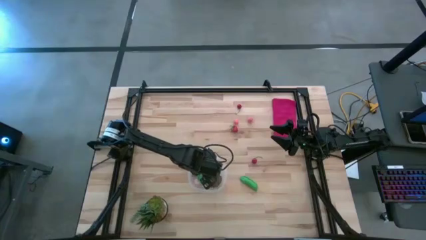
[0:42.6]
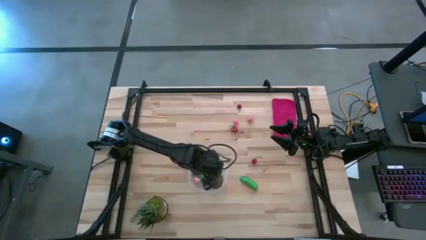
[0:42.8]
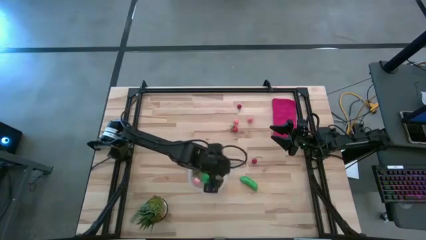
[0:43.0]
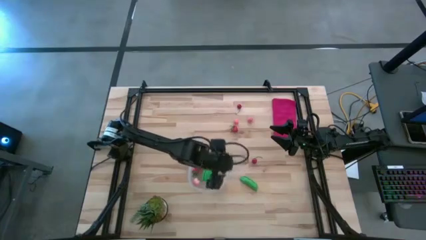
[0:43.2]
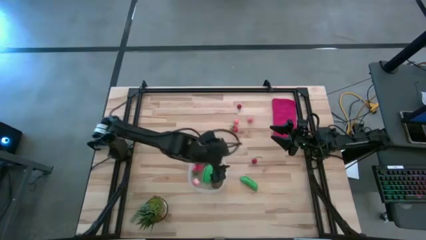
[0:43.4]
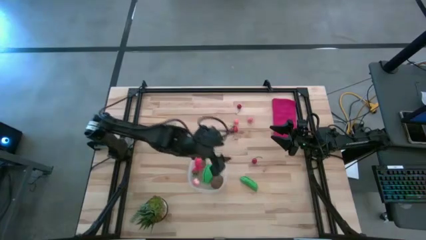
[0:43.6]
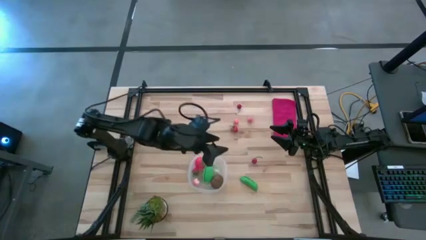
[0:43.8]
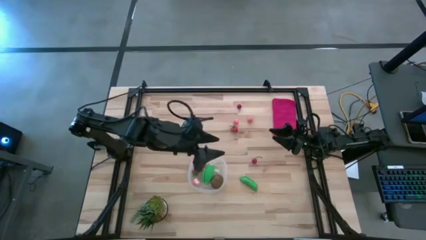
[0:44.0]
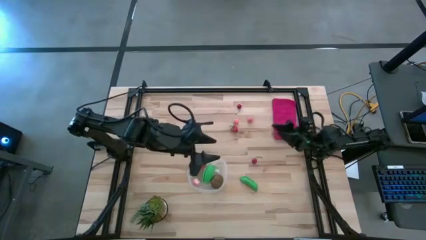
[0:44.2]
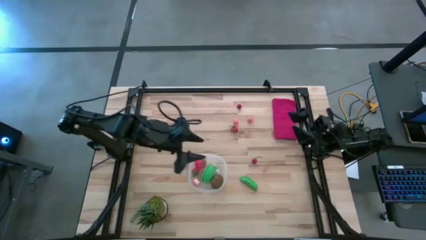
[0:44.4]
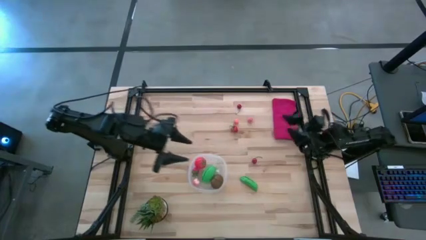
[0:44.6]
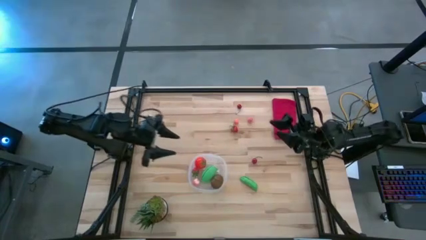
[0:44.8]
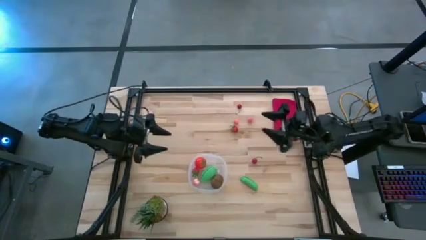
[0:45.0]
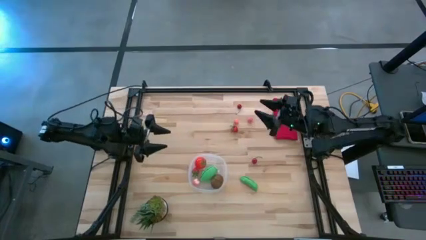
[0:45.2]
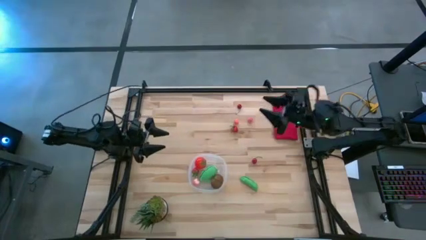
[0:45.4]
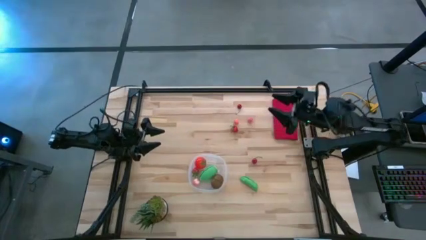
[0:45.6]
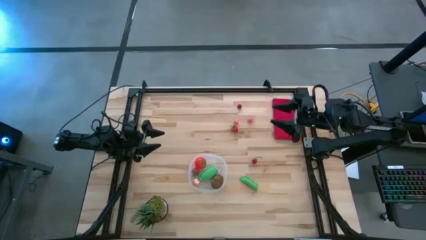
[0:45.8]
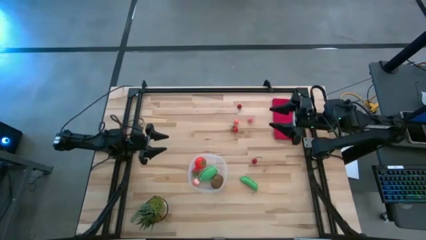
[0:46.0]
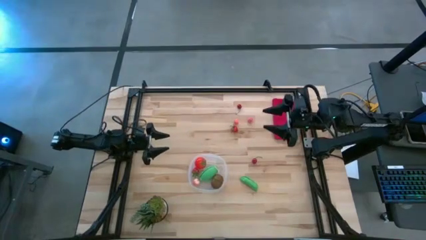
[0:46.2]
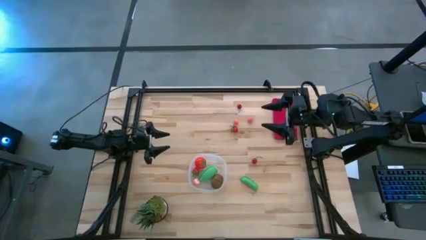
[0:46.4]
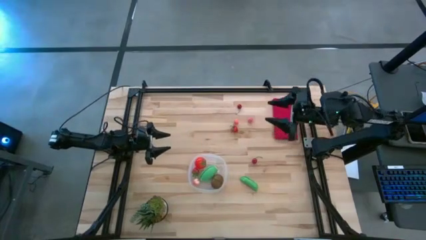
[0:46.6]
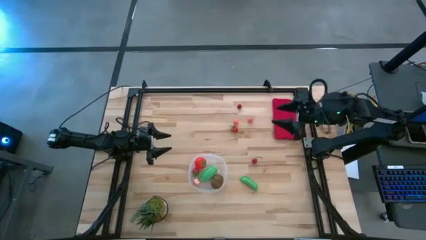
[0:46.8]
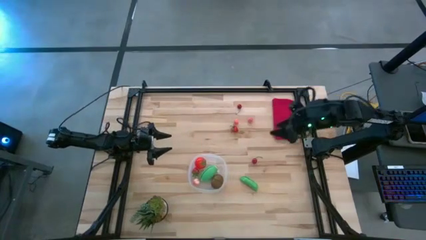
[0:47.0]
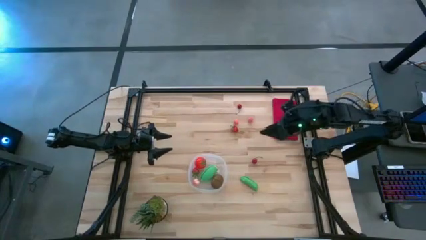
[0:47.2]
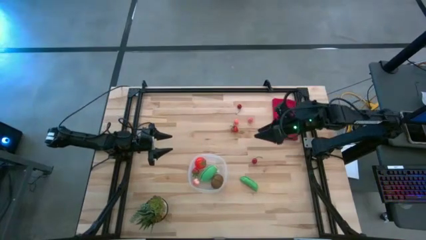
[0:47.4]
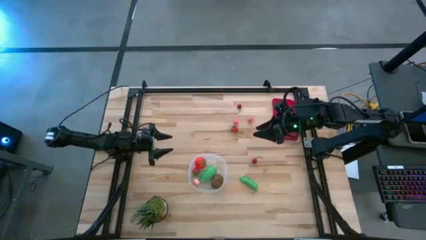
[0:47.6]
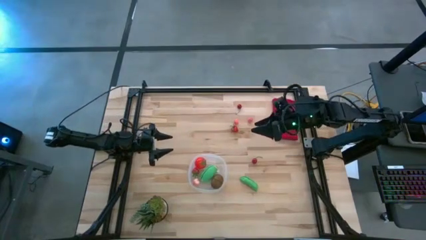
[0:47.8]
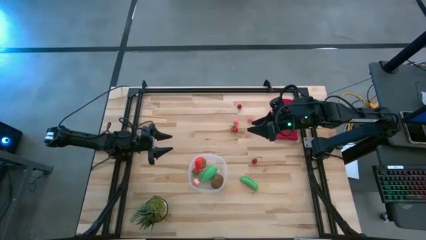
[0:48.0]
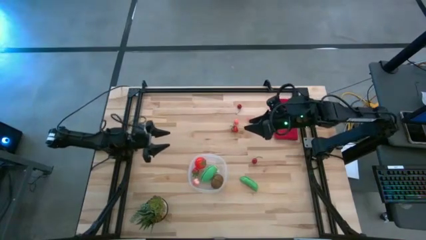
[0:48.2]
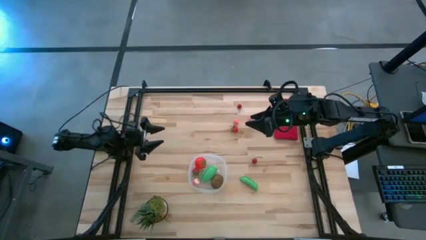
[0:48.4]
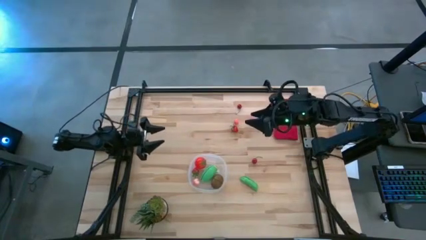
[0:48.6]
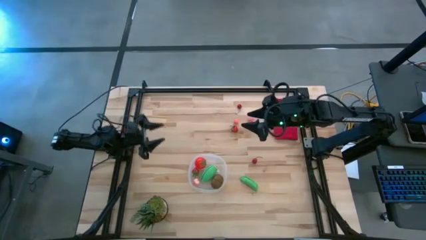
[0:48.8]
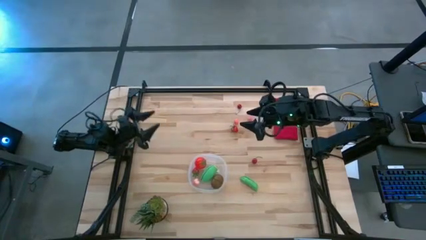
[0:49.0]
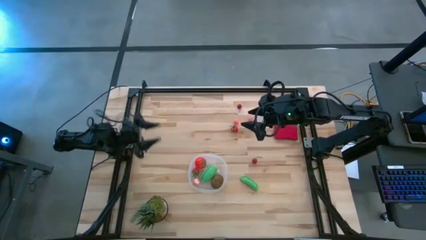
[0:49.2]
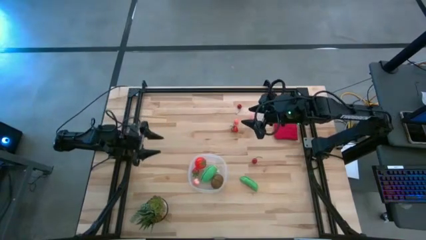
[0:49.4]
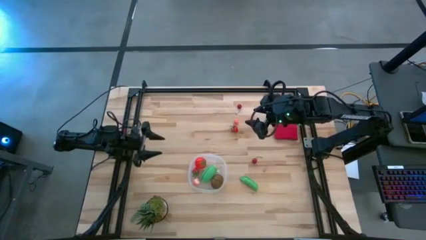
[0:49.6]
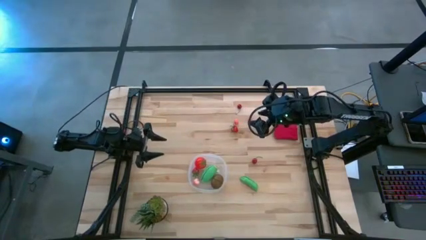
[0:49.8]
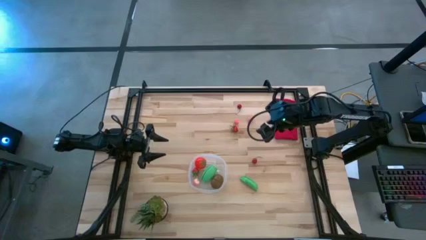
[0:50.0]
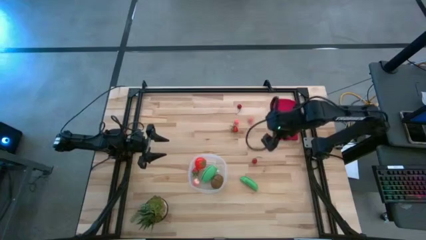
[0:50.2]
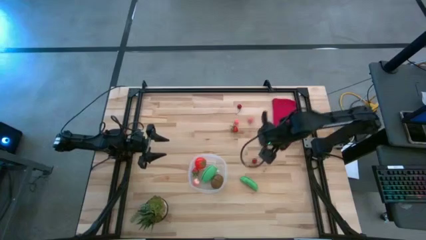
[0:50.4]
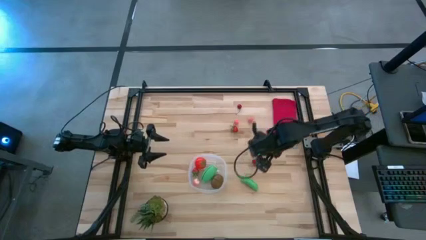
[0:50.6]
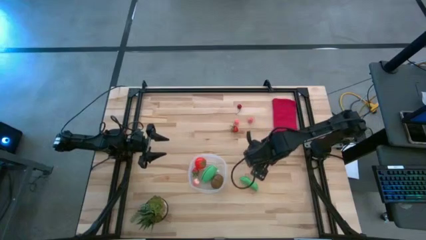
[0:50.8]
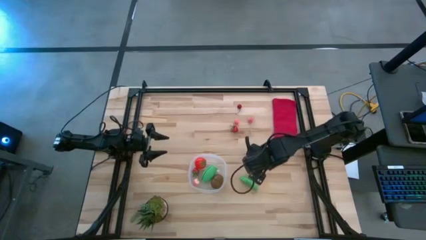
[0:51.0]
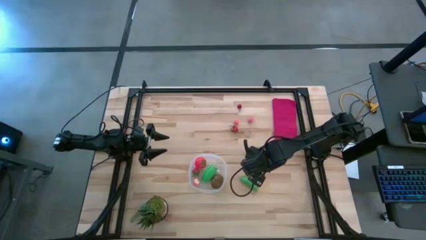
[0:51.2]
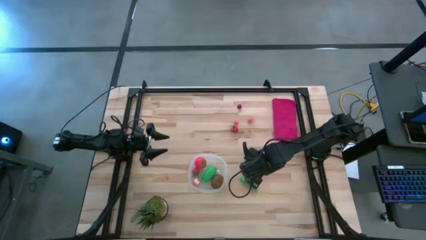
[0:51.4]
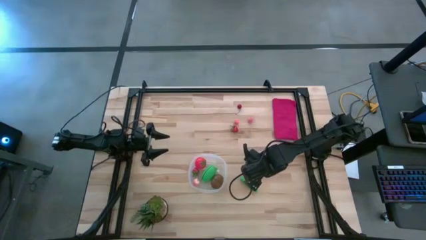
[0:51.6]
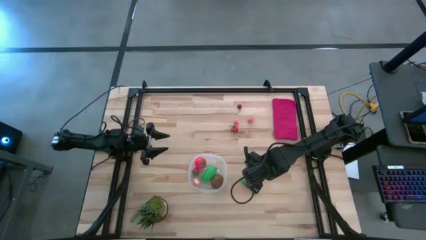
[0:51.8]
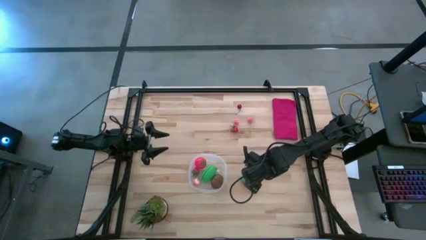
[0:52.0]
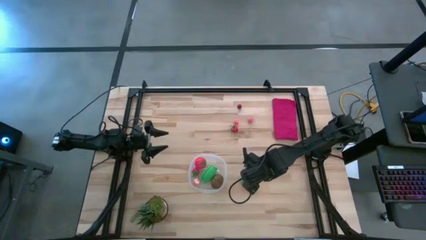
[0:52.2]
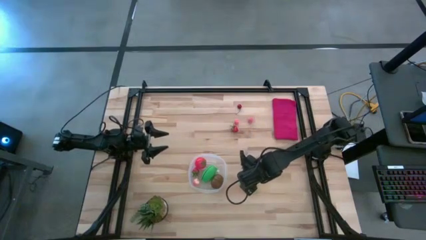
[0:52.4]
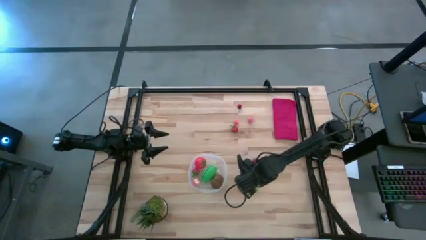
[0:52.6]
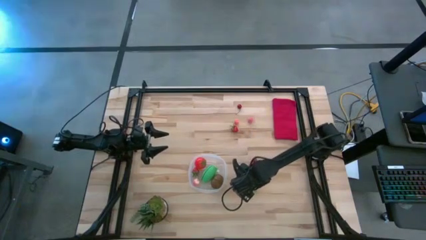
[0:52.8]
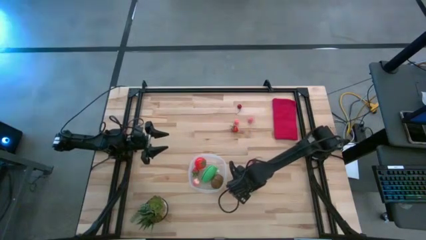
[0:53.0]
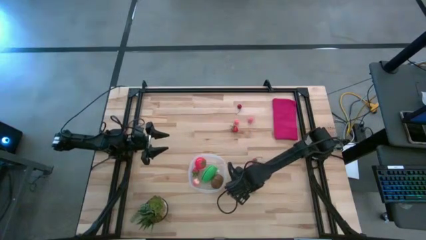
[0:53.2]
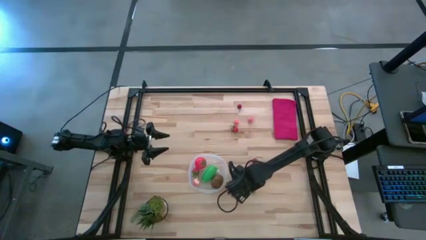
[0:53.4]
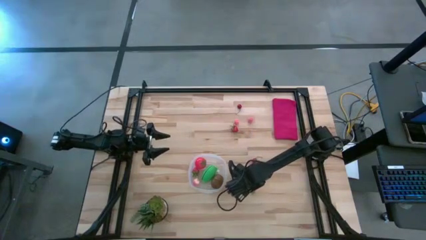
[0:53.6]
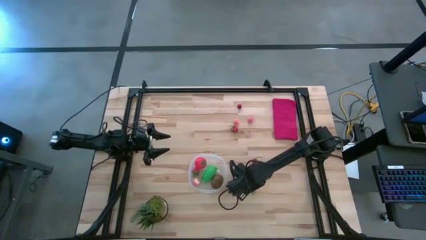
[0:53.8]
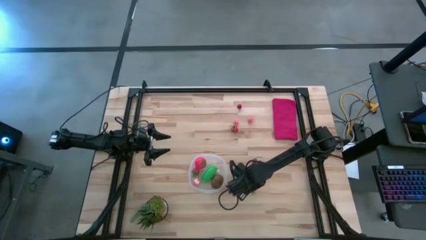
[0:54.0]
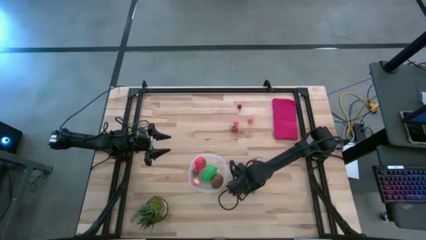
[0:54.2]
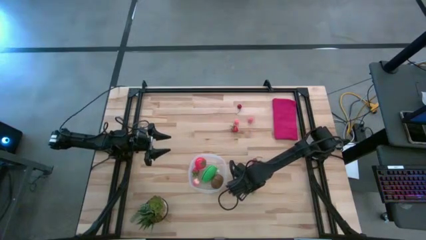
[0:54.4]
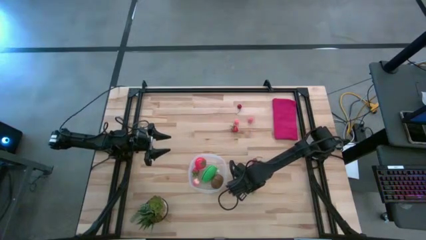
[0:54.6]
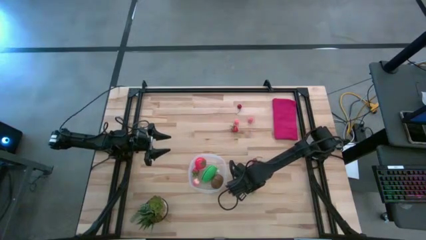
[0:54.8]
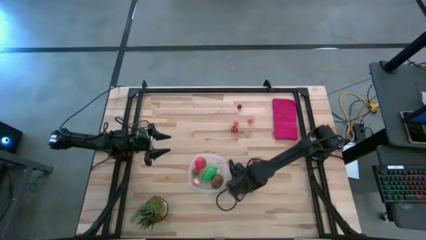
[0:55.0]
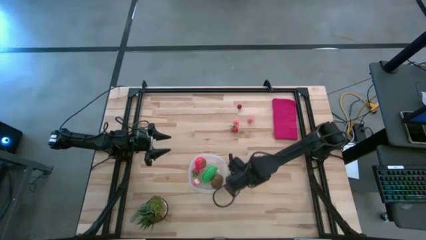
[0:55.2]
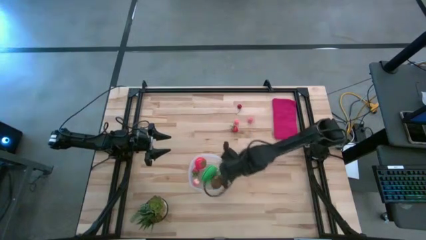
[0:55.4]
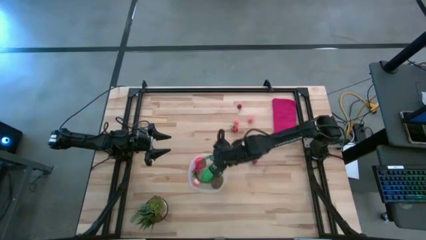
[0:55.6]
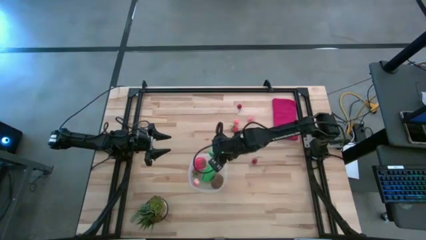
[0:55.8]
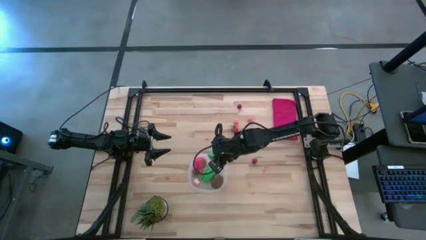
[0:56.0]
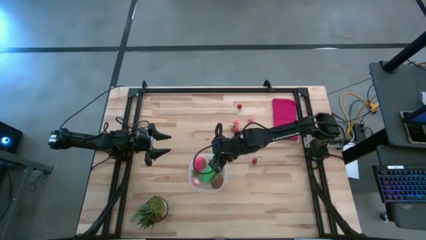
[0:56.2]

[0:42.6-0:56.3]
Task: Pick and placing Produce into tupperware
Put the green pea into the bin

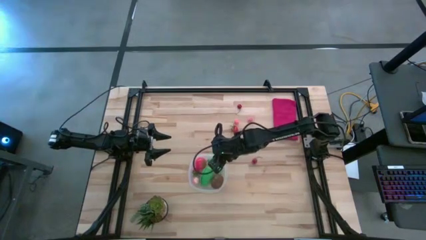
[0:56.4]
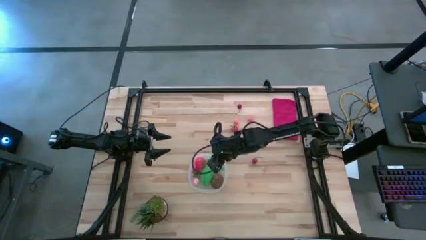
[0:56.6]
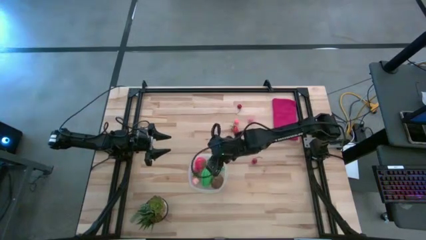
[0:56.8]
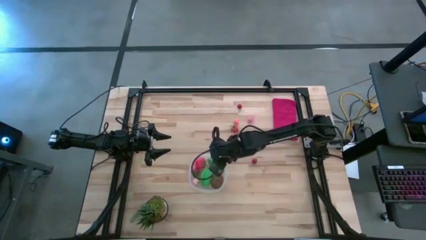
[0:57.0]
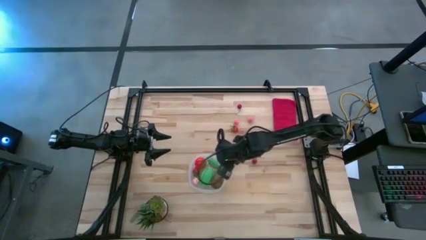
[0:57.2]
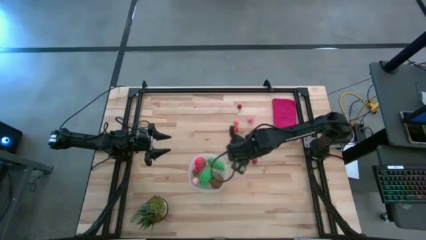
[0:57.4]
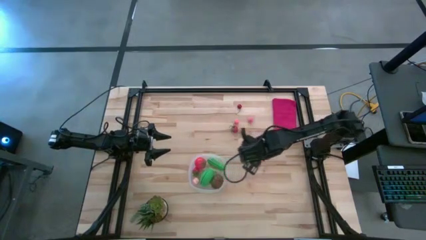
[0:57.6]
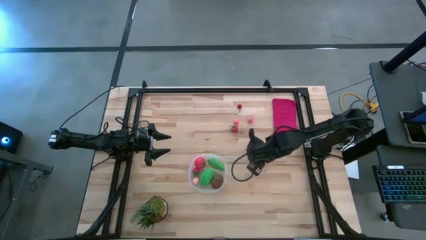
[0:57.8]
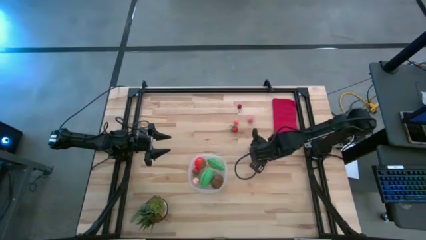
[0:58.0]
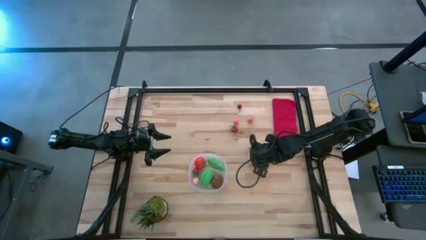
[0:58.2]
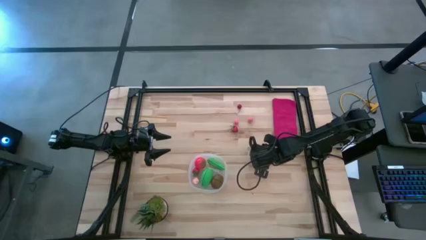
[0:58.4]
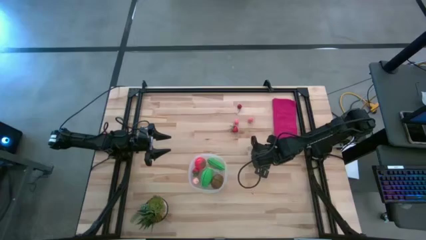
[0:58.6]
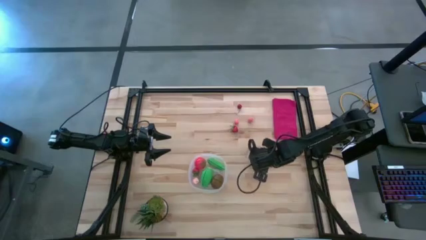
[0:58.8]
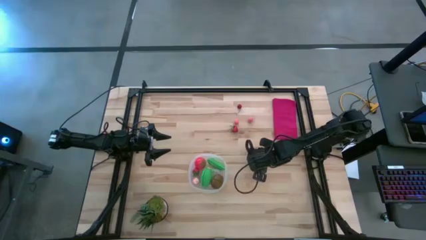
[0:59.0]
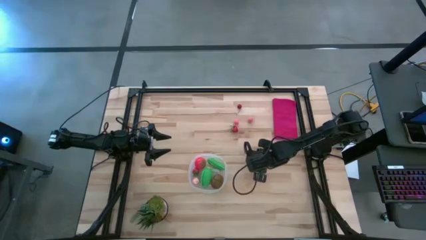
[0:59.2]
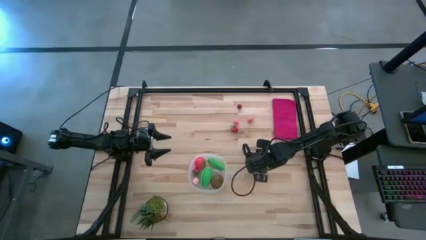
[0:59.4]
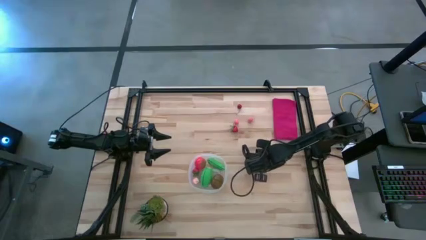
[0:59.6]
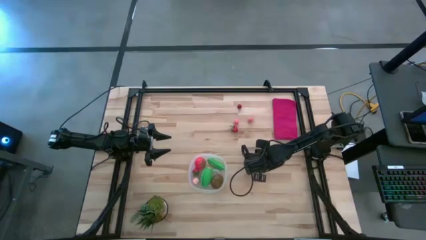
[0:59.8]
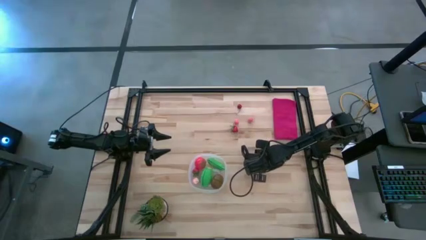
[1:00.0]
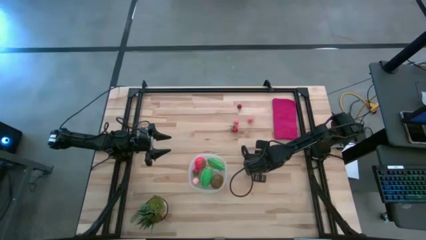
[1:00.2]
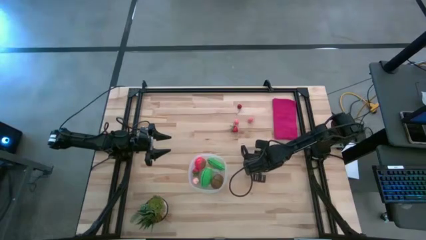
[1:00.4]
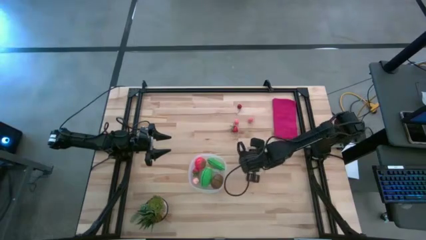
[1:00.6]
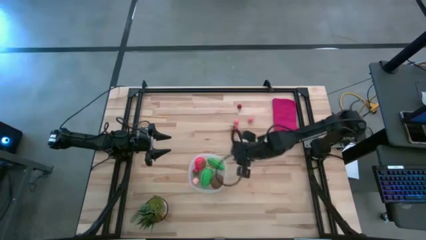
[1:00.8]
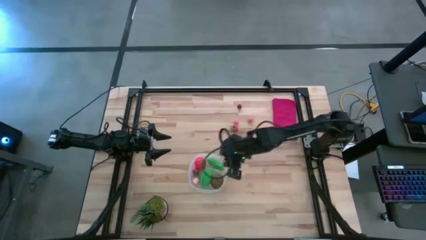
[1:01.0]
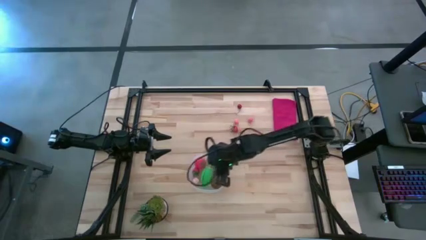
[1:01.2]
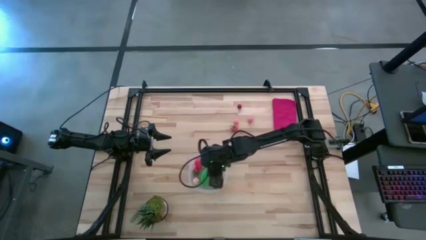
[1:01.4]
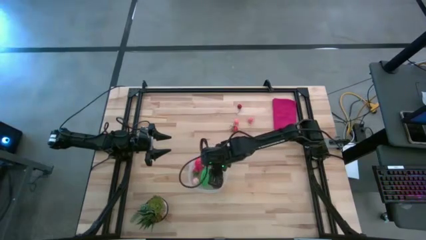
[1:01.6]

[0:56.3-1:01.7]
Put the red cherry into the bin
